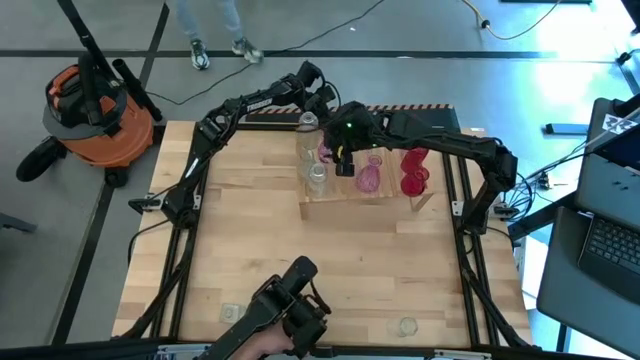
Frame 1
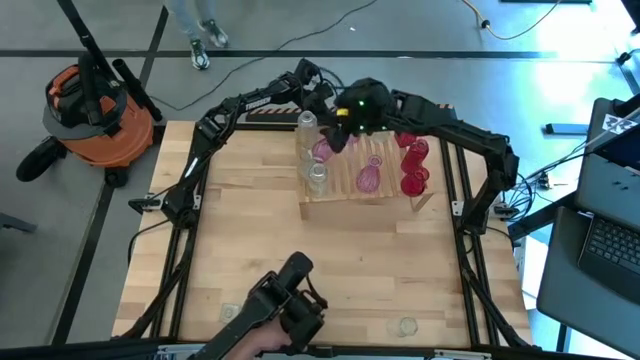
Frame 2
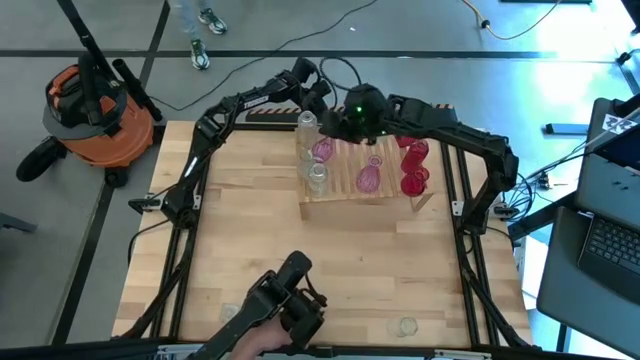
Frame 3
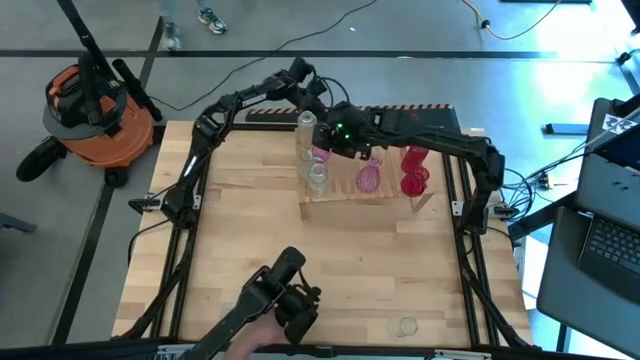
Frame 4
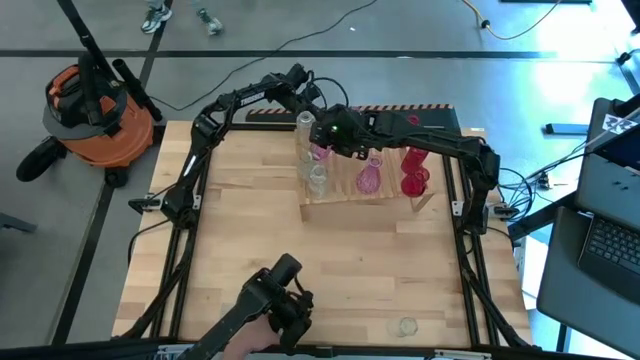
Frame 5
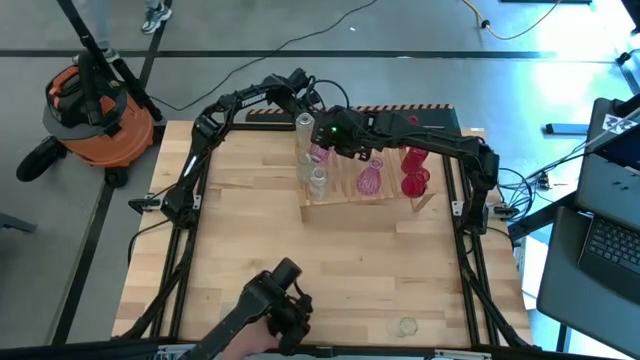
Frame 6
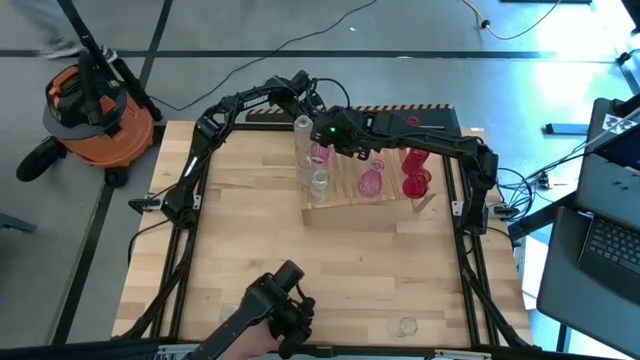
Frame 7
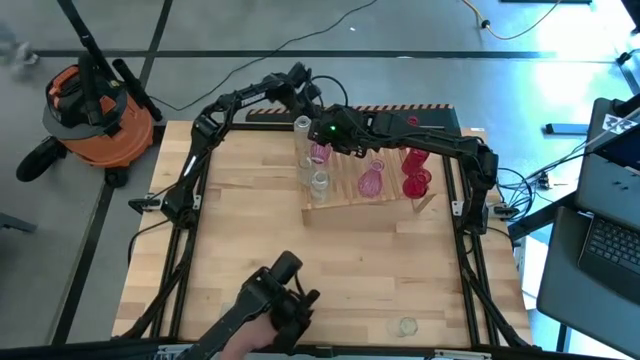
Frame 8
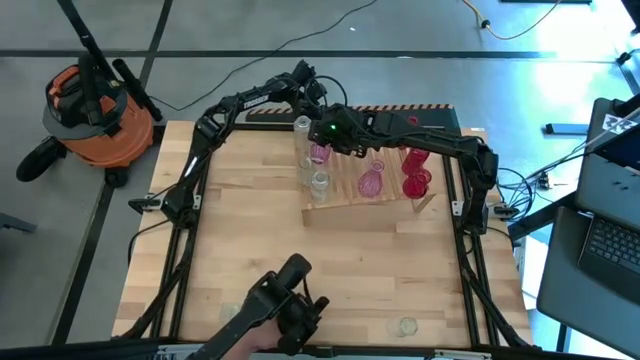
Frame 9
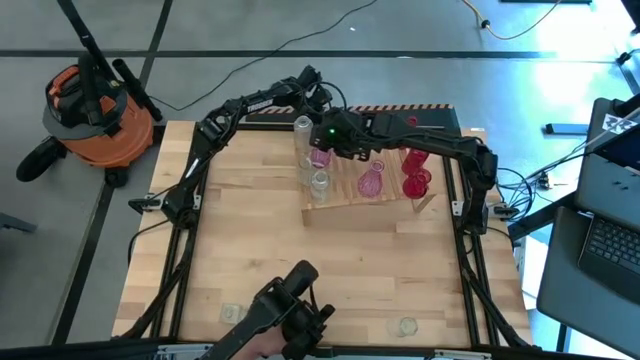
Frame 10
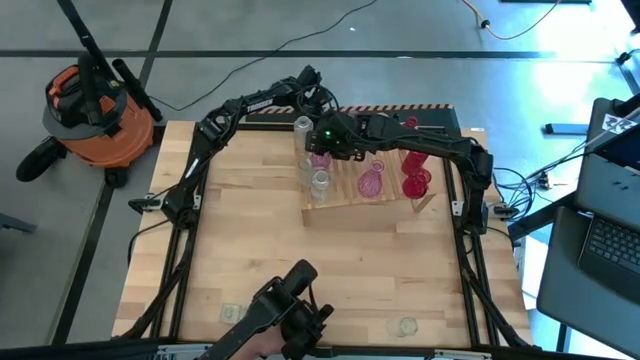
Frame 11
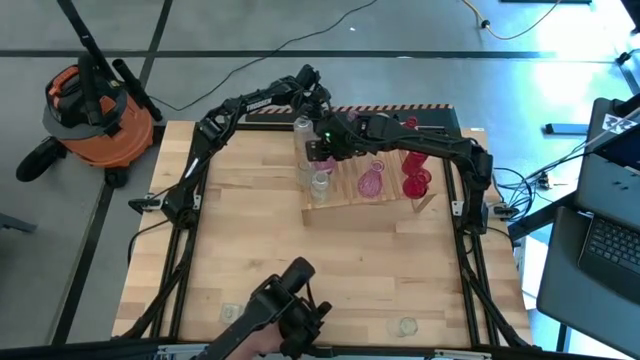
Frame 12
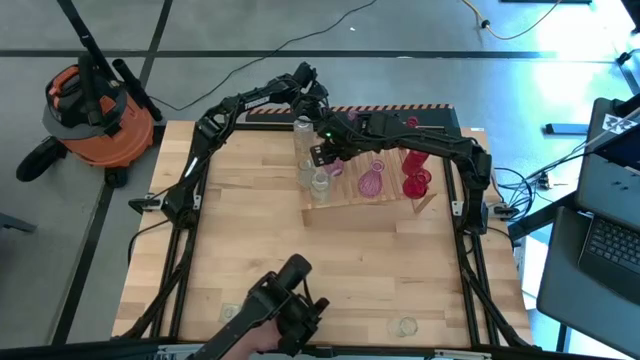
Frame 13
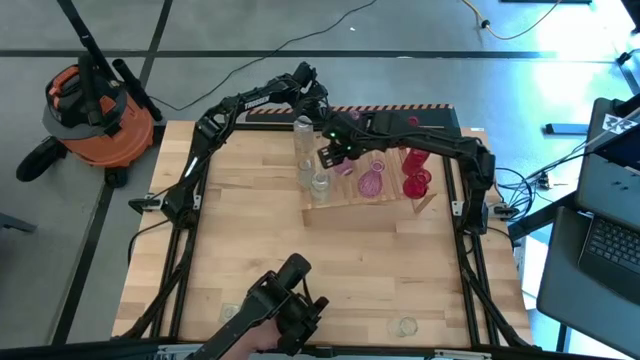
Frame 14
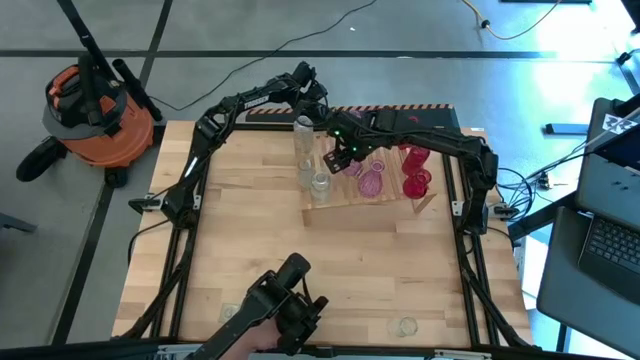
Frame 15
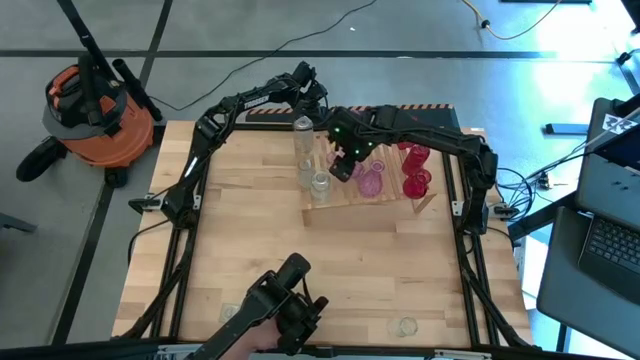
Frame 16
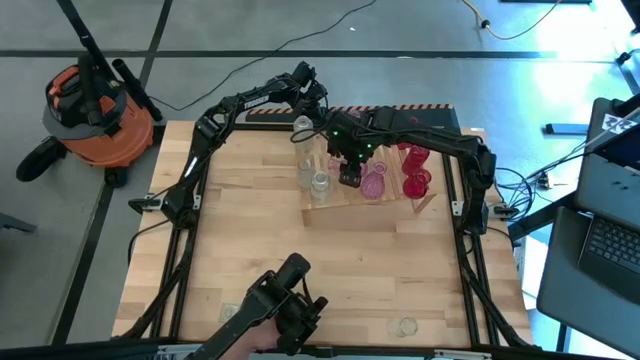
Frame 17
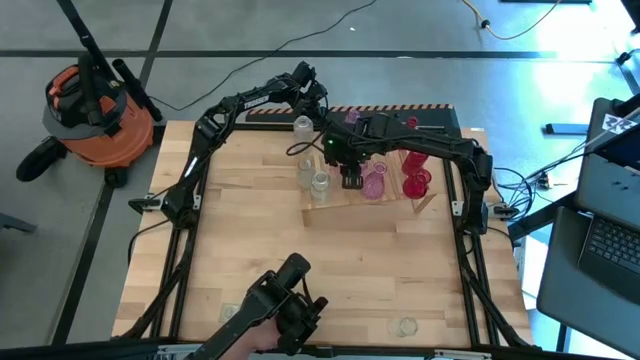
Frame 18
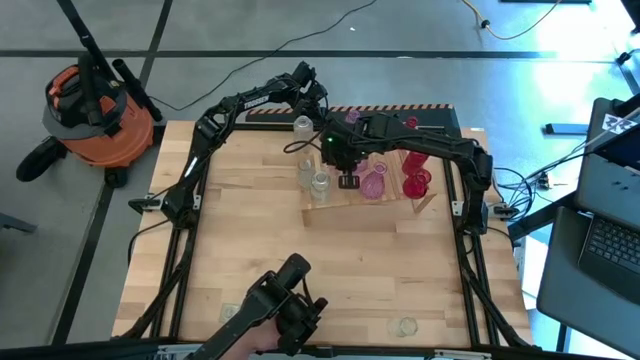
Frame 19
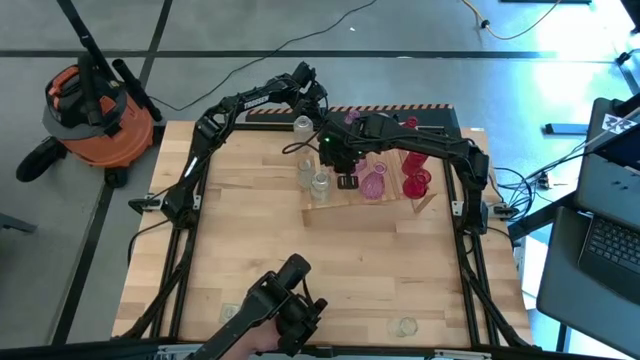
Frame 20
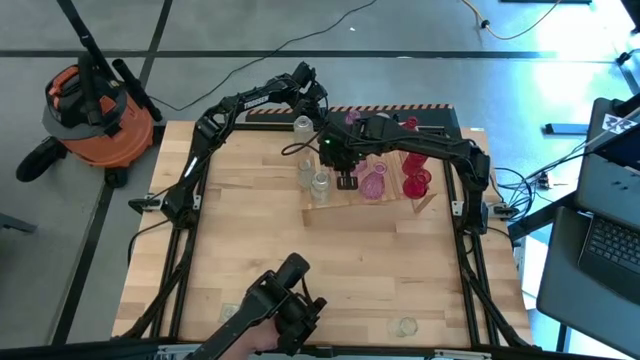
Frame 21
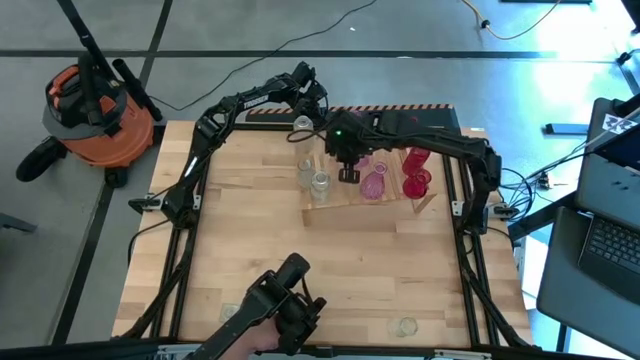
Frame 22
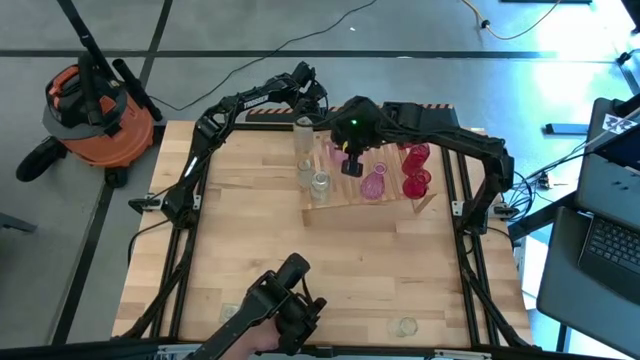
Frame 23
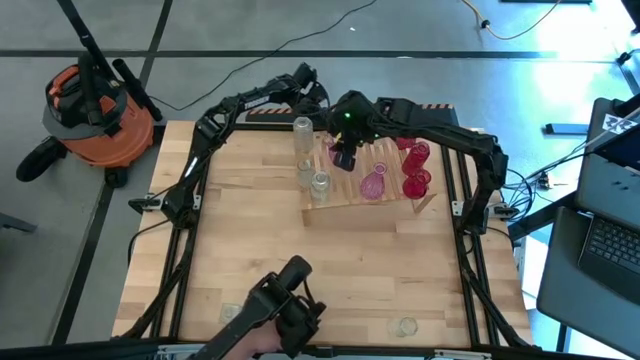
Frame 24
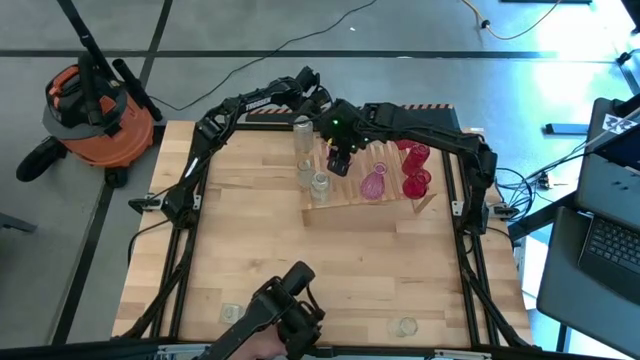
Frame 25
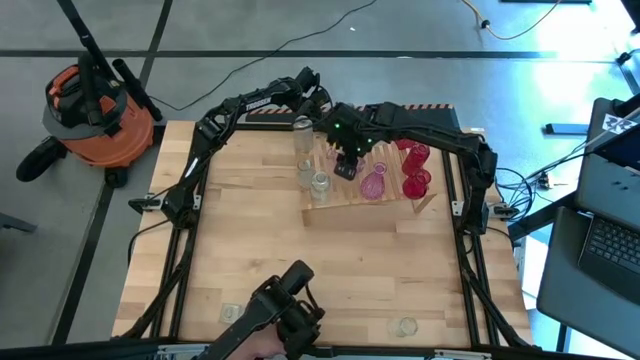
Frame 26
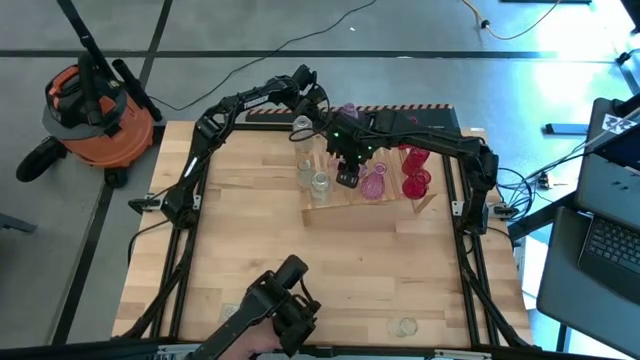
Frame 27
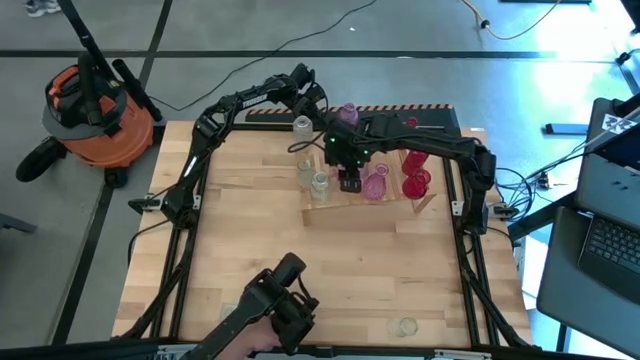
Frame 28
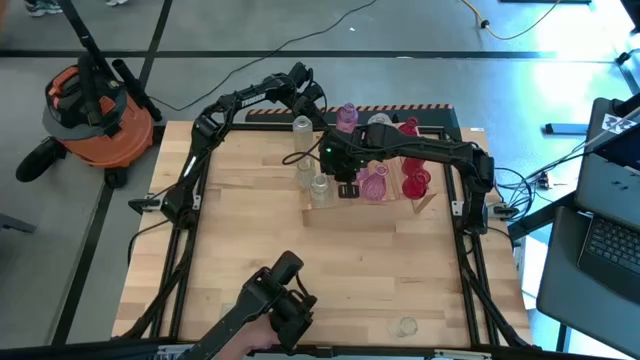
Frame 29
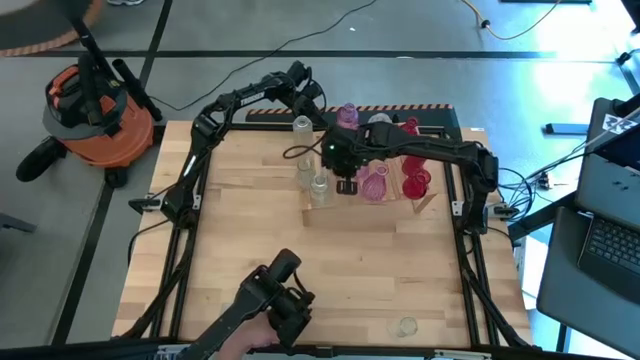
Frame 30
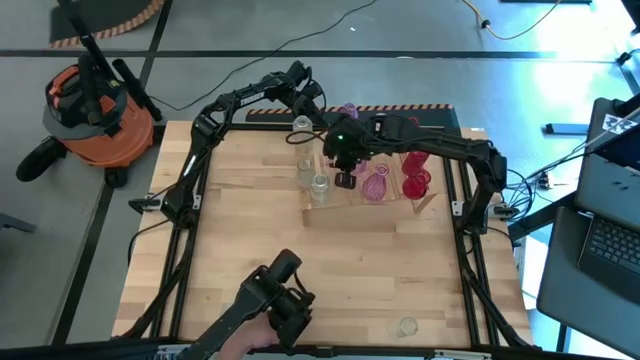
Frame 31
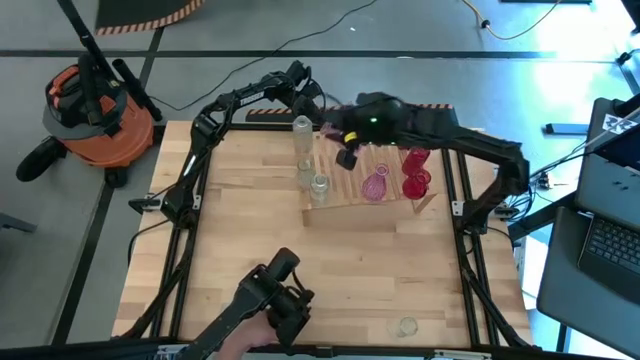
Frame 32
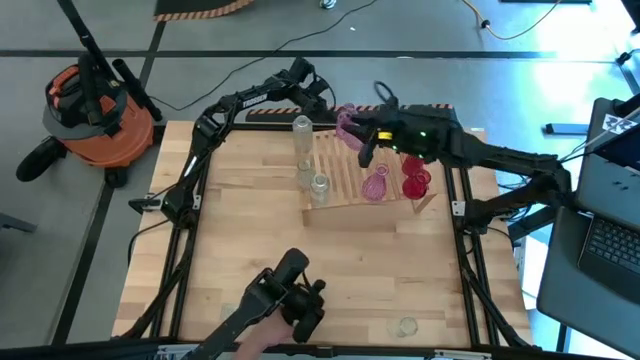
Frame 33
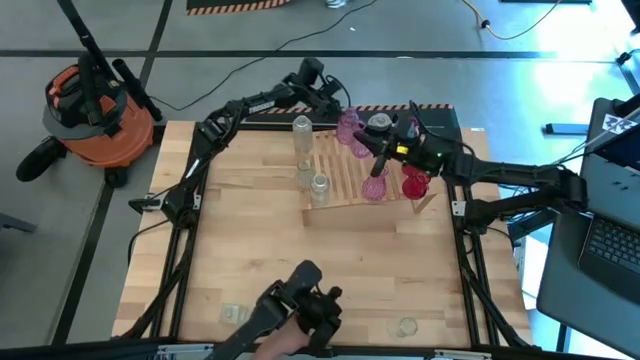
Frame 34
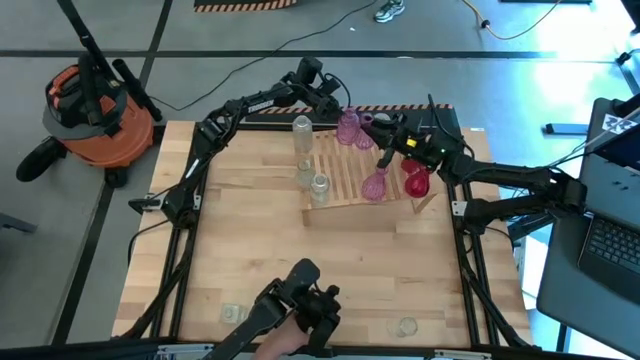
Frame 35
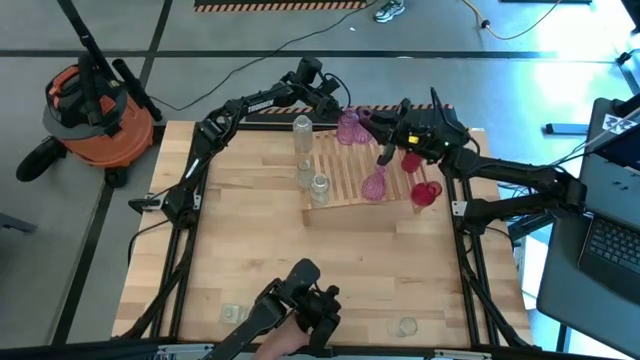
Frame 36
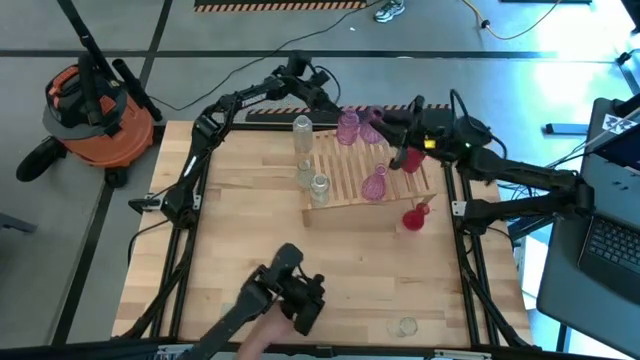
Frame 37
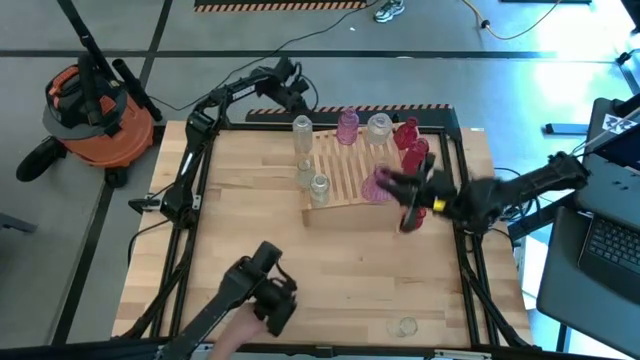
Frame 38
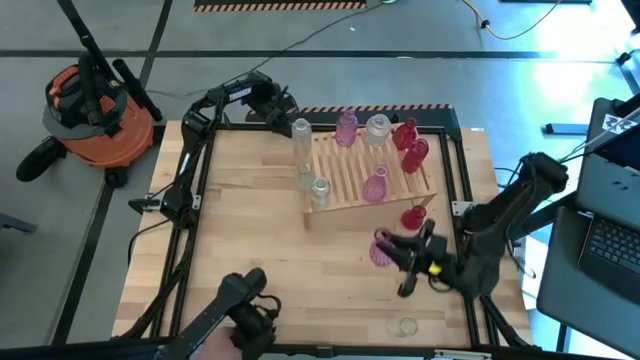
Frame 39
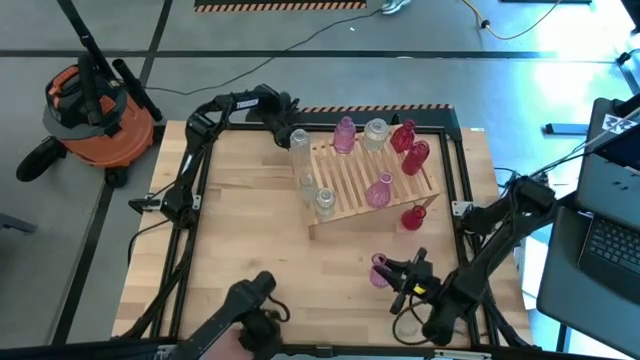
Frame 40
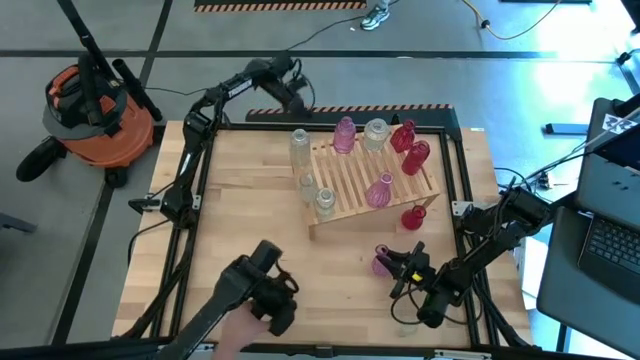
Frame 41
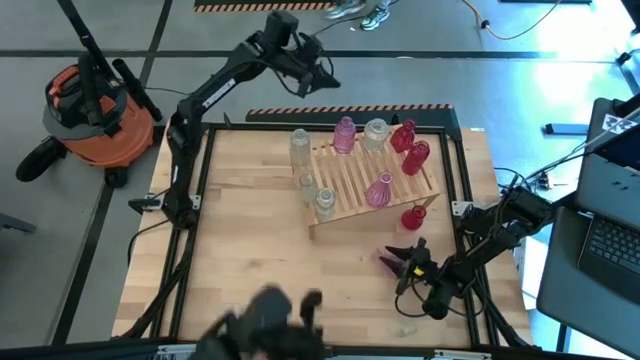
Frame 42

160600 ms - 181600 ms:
Task: sort vases onto shelf
Adjust the pink vase on the shelf
